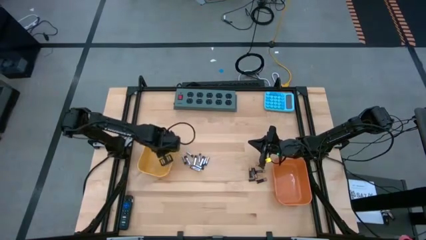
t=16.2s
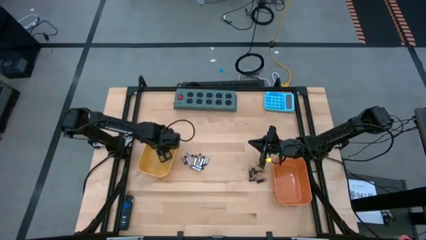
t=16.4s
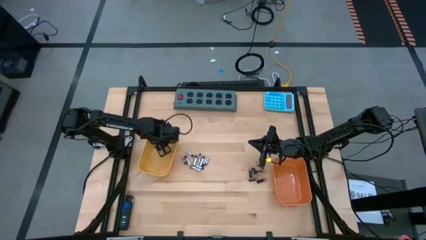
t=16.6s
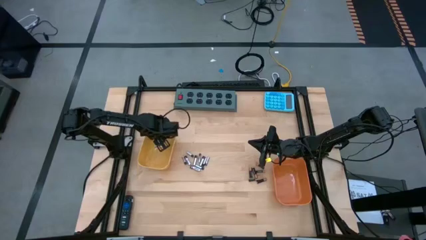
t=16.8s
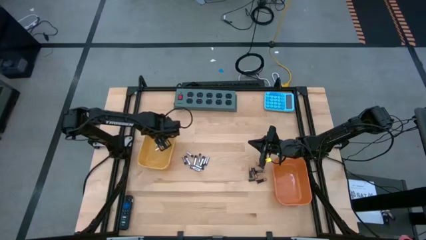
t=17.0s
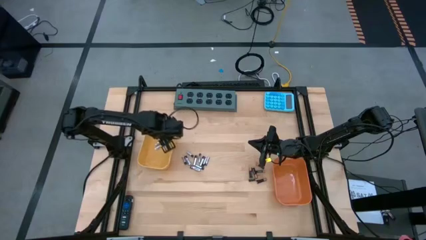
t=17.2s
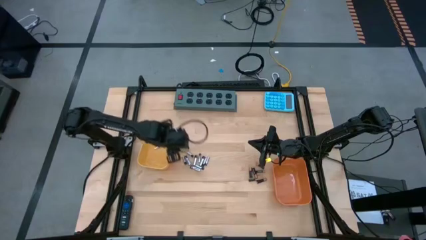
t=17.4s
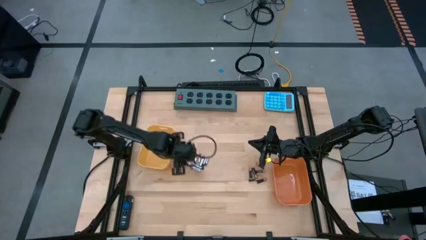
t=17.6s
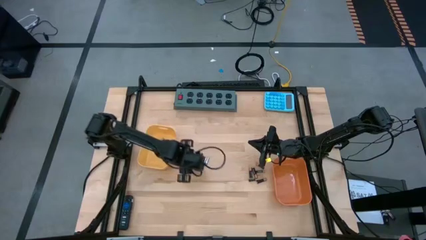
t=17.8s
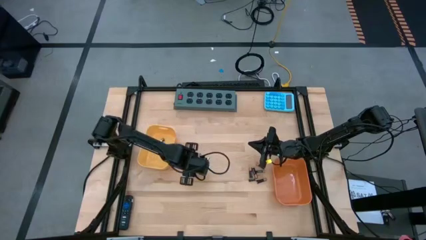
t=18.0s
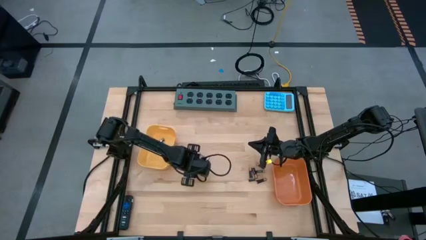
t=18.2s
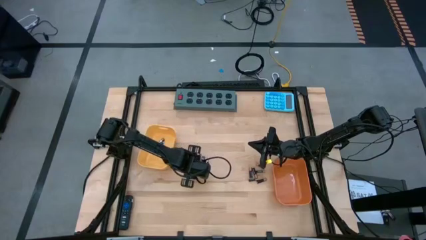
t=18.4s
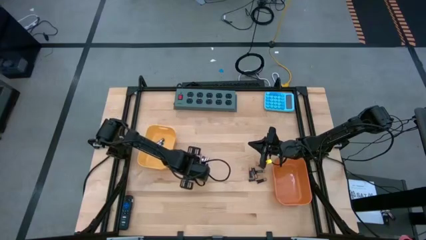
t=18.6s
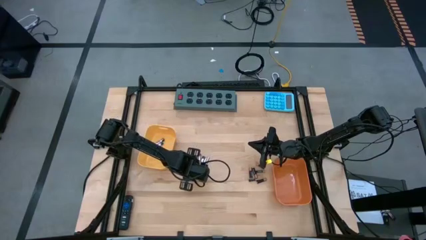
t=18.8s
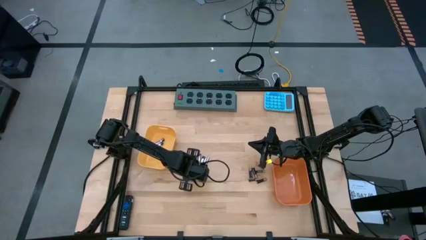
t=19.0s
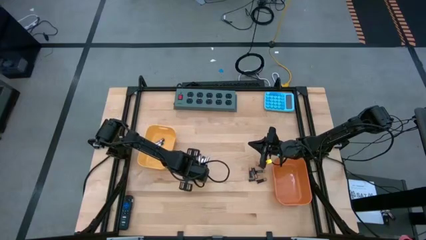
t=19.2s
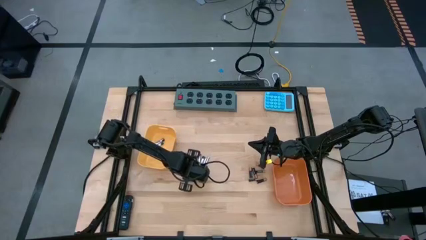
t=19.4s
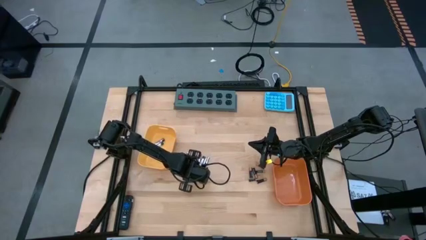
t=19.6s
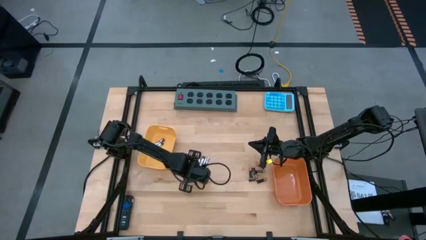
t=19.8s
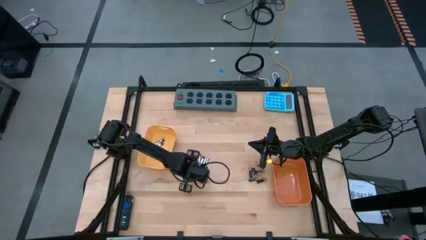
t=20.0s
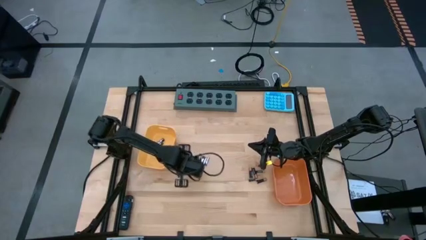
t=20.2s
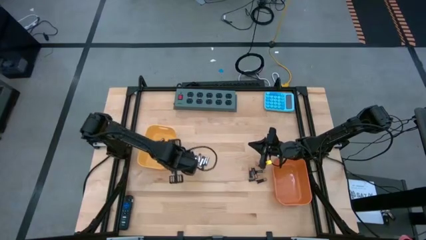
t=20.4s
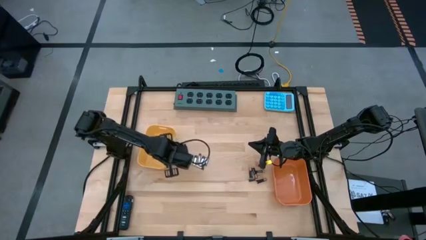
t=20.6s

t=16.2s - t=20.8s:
Task: Sort batteries
Put the silver battery into the yellow bin

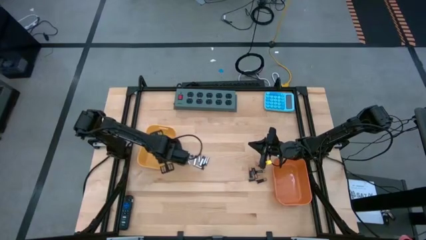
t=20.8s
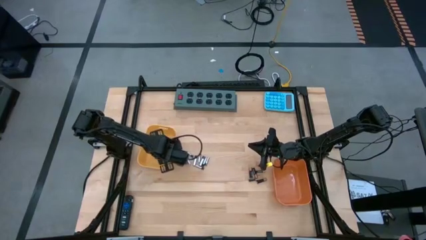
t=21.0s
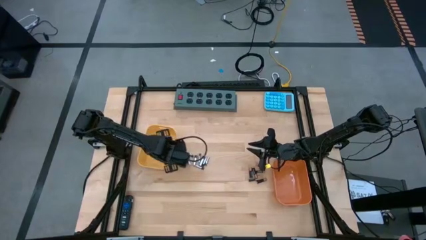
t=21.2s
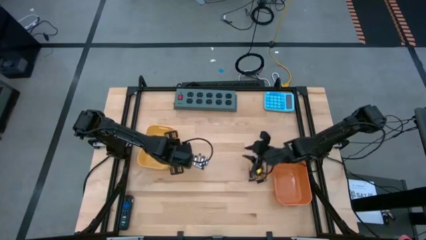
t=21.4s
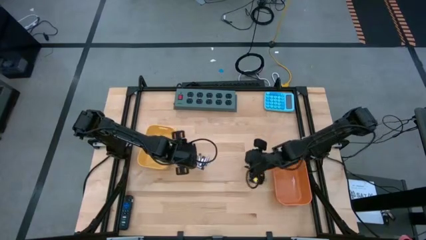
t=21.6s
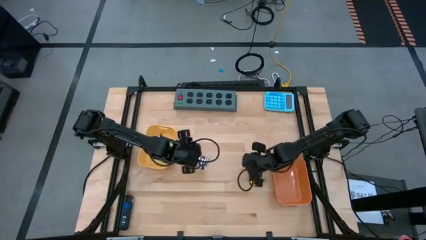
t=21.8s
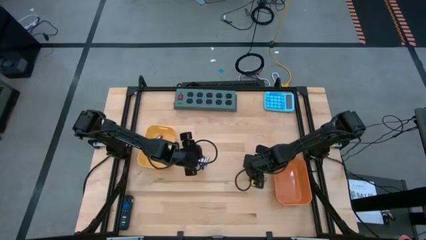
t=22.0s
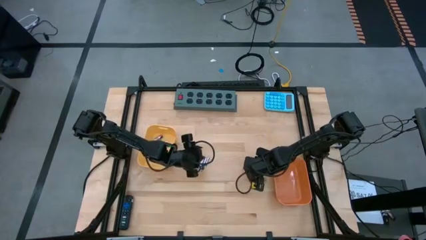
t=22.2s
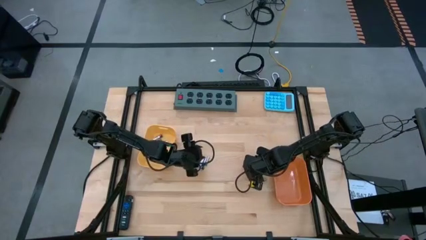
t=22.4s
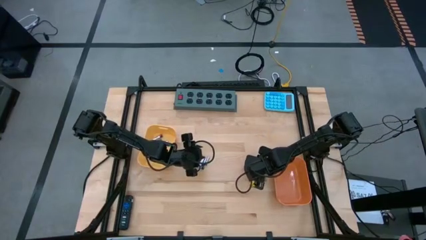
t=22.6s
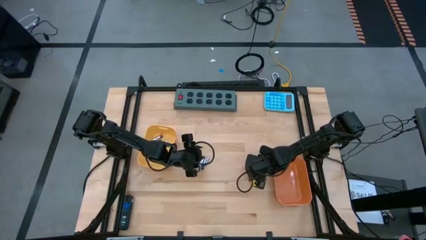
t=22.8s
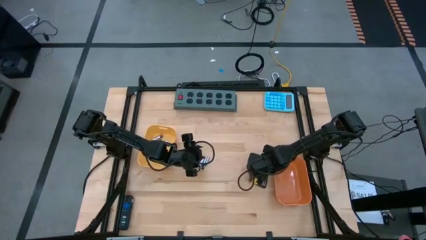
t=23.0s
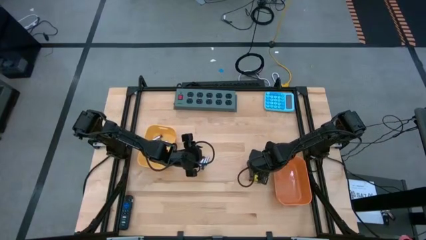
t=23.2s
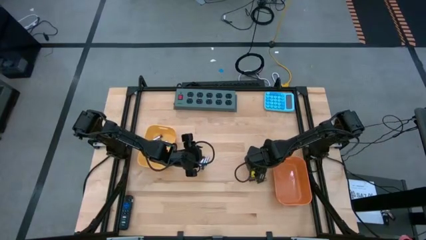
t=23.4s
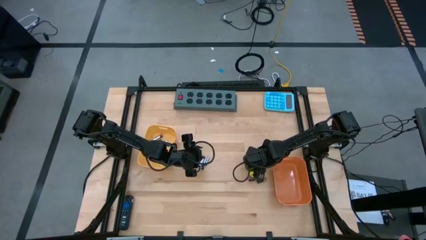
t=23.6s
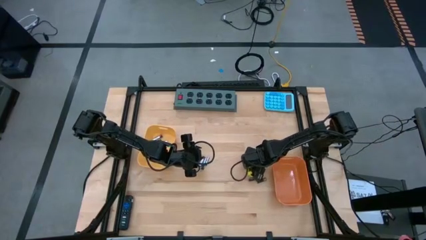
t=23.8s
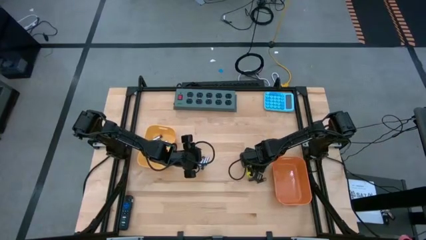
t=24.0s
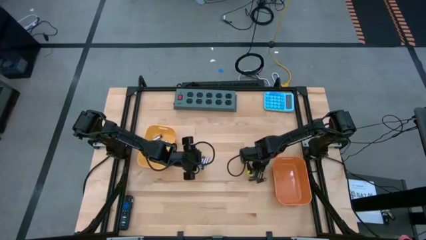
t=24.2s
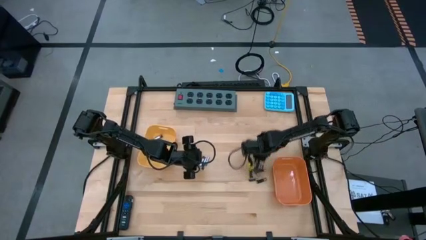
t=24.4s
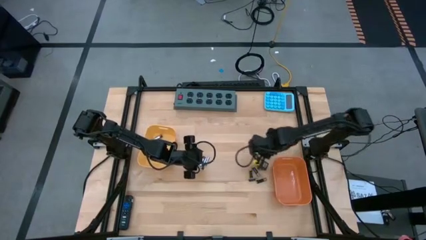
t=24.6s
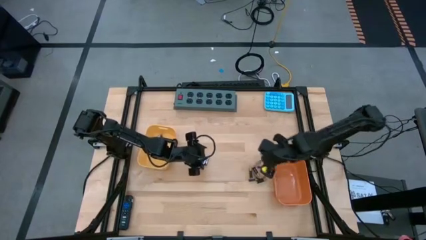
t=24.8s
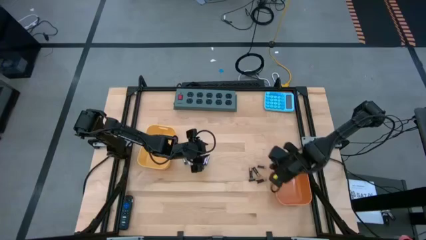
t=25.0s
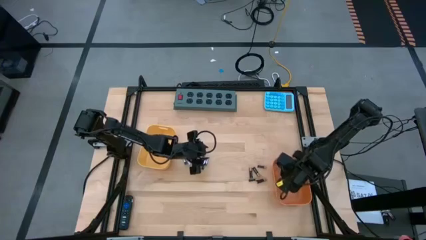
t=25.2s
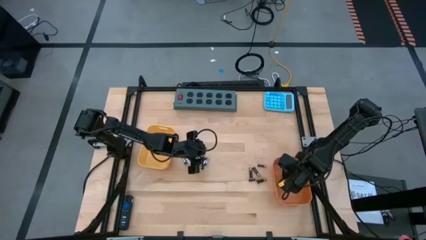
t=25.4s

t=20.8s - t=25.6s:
Put the black battery into the orange bin

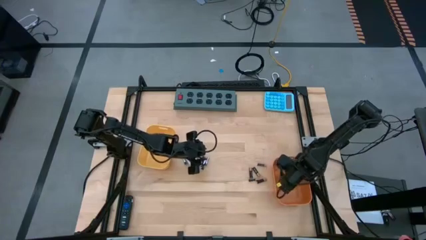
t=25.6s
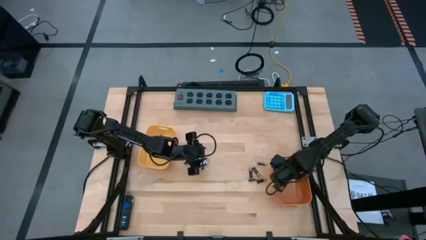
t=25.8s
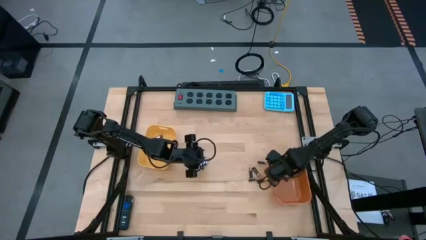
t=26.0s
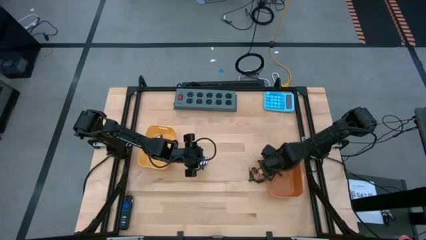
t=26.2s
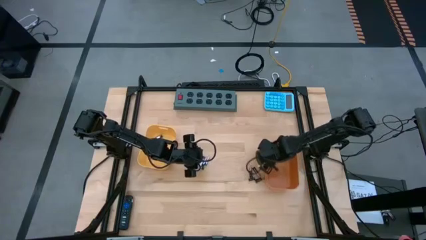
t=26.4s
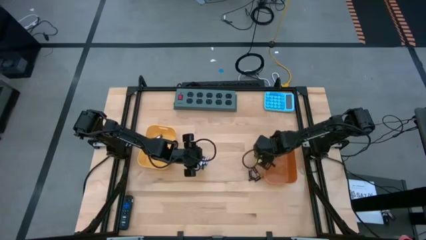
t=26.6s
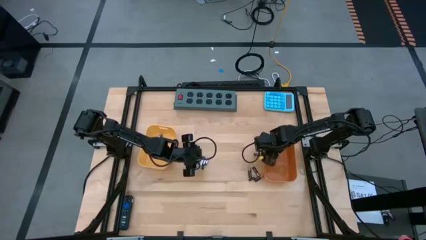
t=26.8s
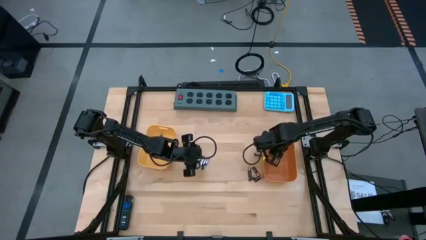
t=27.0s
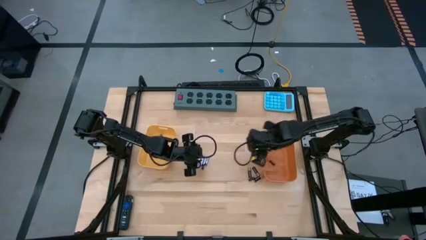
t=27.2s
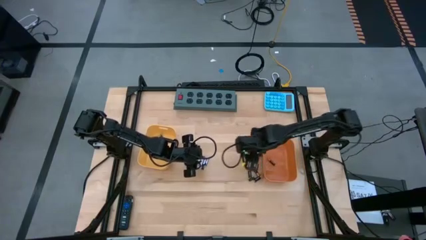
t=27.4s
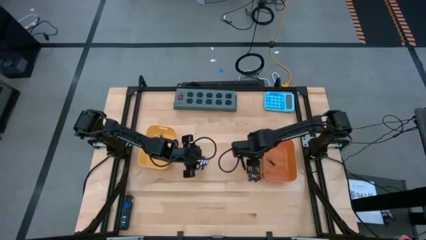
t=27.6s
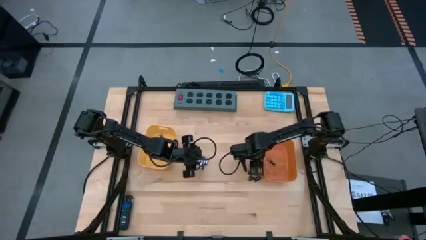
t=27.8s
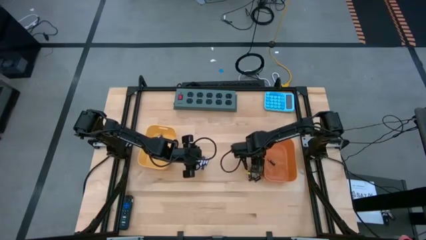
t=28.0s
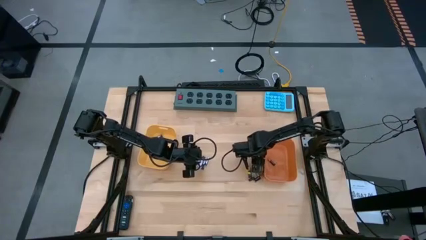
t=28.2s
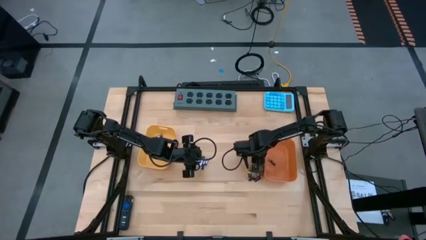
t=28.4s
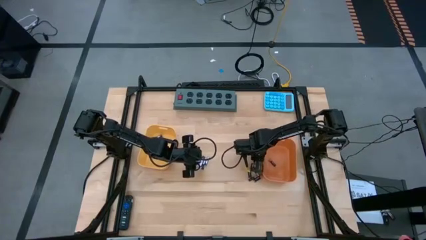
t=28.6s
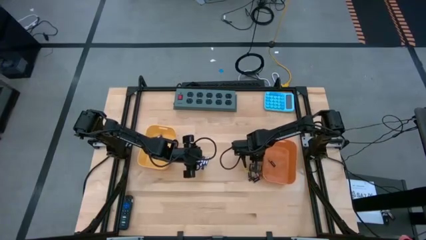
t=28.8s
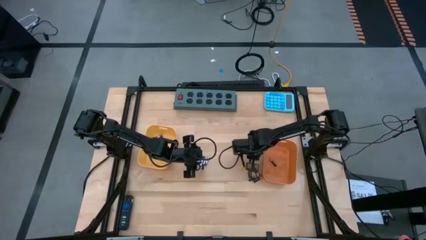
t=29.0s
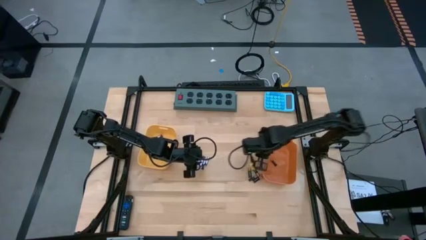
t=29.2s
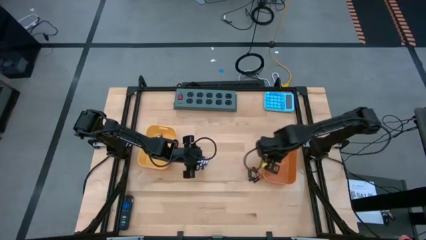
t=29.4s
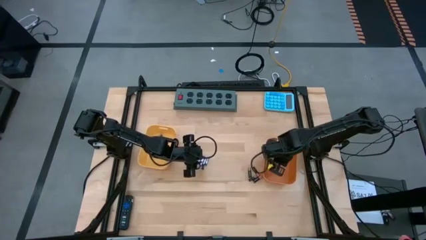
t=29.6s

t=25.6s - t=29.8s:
Put the black battery into the orange bin

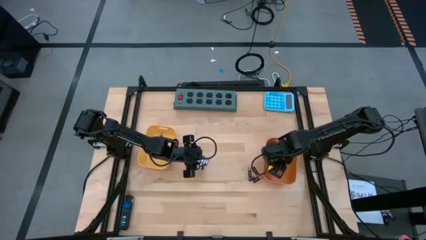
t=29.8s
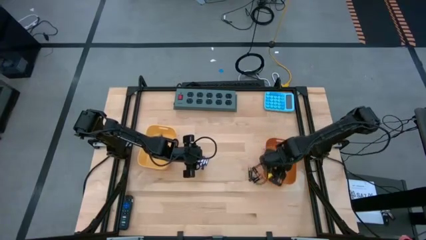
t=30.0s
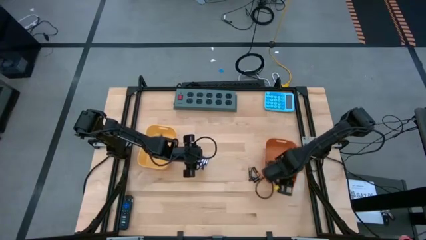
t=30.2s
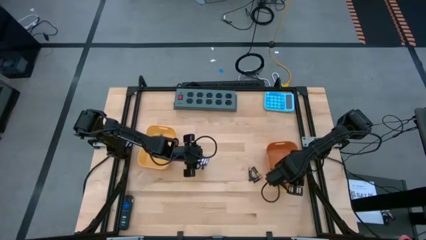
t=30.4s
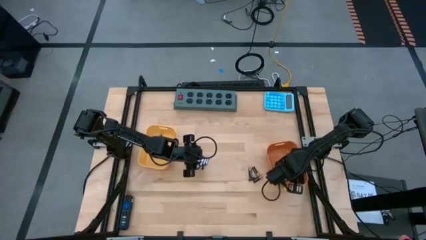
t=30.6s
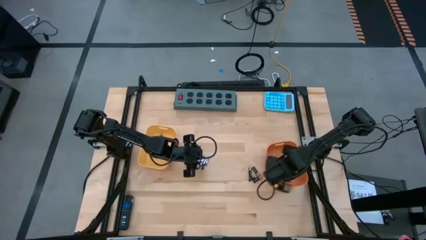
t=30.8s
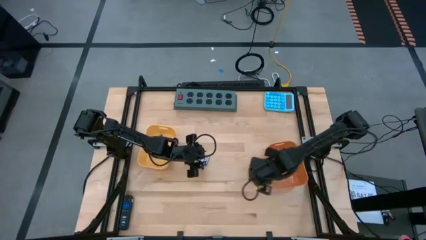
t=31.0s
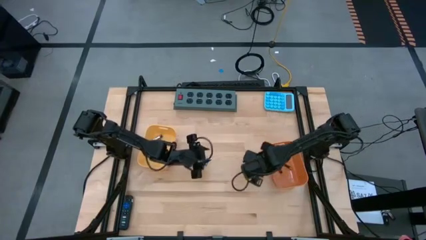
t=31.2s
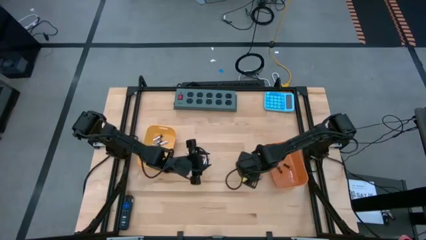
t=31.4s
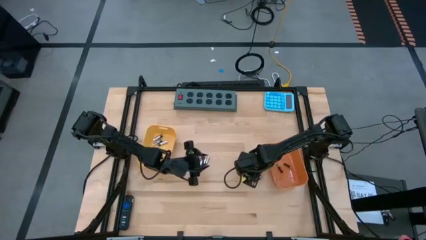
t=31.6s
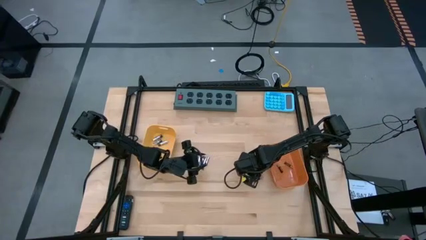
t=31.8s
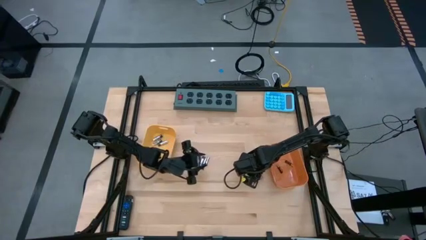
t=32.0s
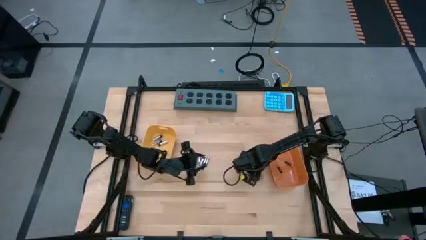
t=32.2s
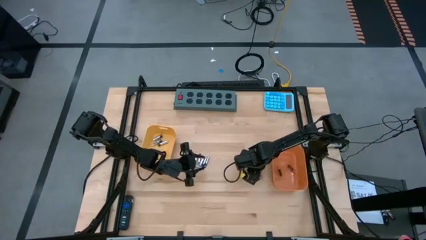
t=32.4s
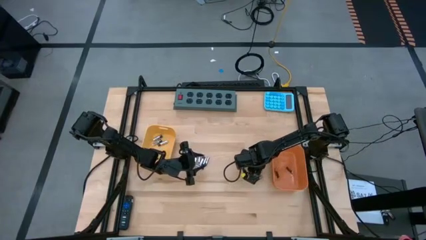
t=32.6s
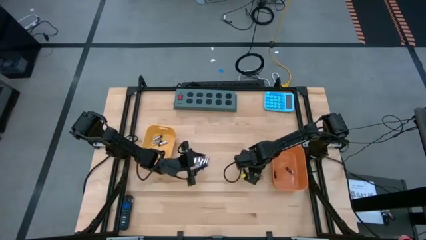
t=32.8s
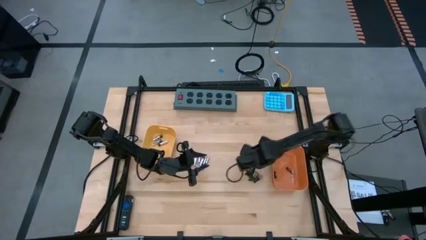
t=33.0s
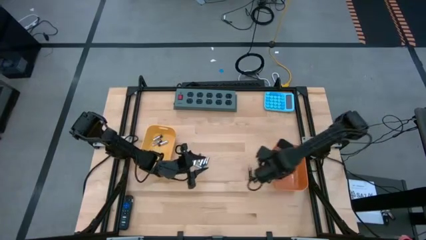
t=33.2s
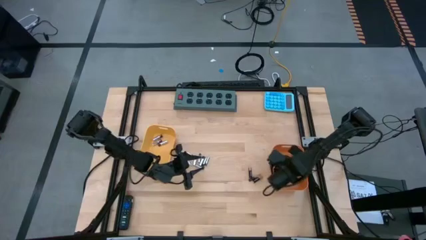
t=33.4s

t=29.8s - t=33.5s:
Put the black battery into the orange bin
